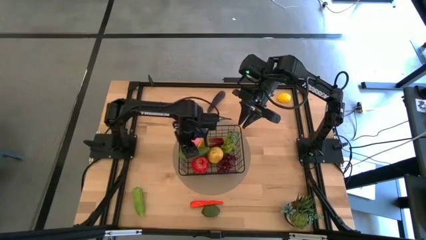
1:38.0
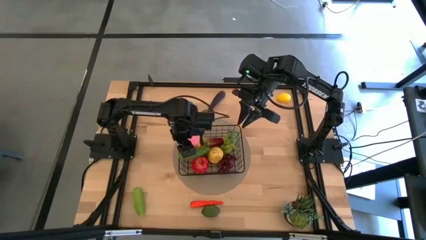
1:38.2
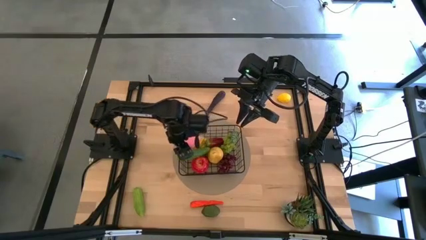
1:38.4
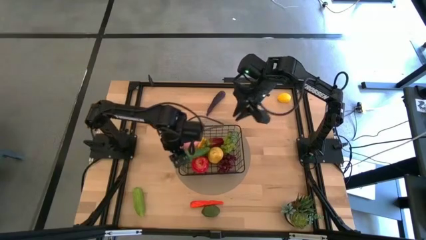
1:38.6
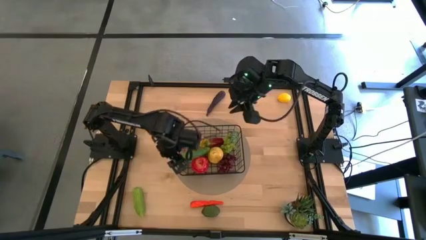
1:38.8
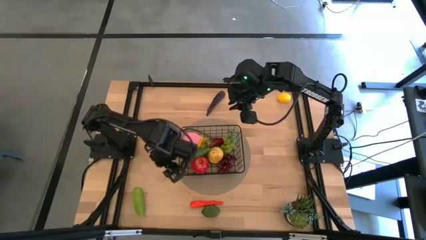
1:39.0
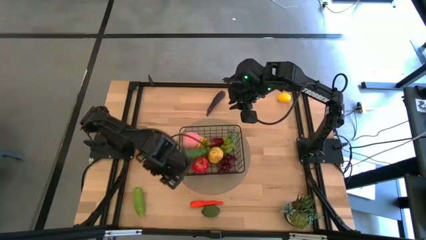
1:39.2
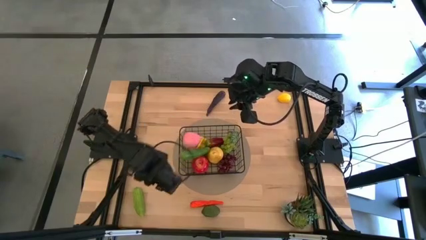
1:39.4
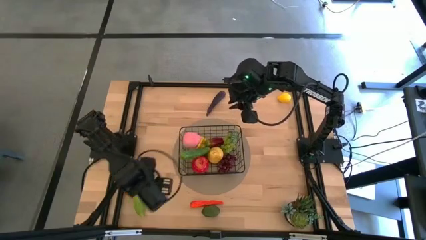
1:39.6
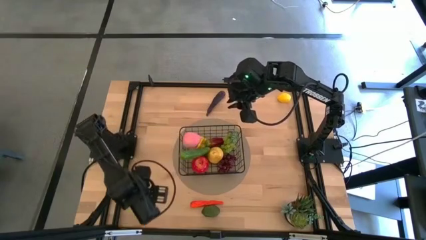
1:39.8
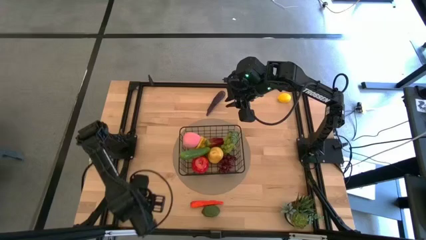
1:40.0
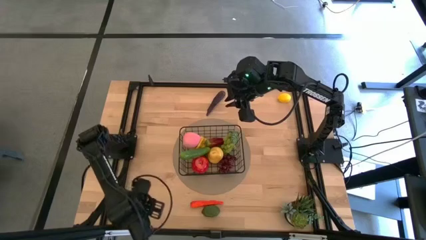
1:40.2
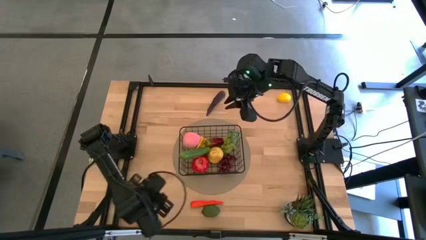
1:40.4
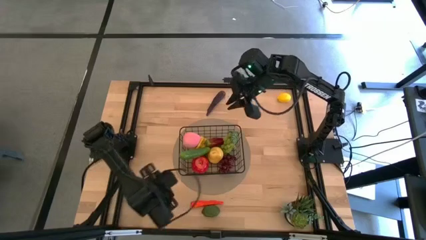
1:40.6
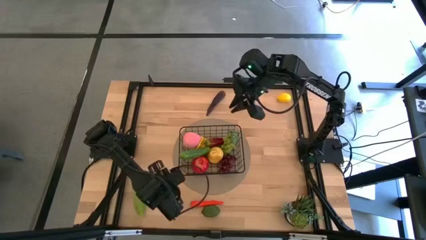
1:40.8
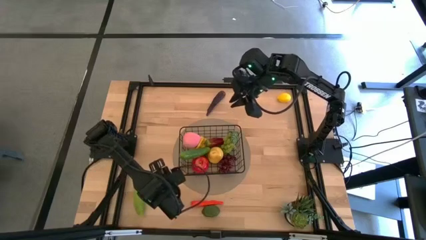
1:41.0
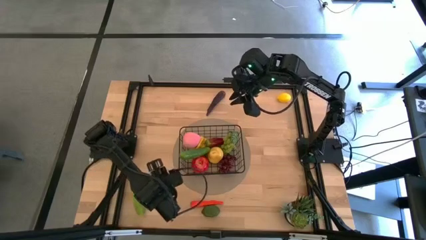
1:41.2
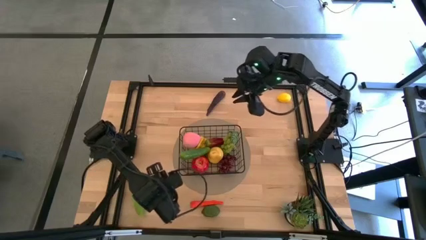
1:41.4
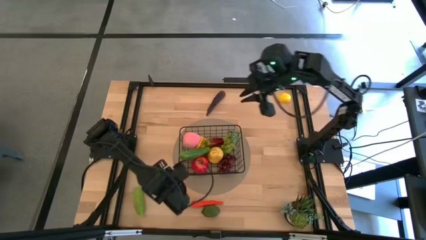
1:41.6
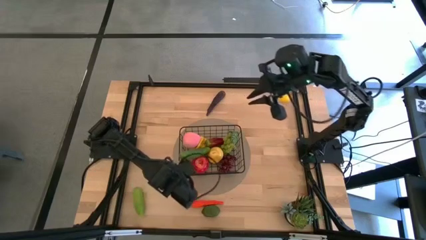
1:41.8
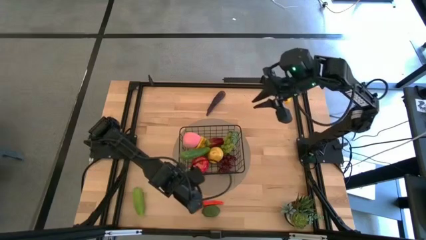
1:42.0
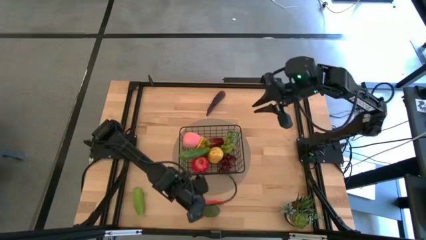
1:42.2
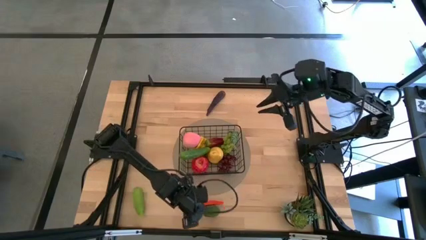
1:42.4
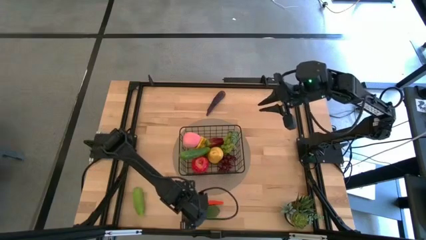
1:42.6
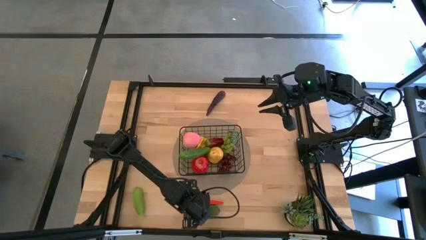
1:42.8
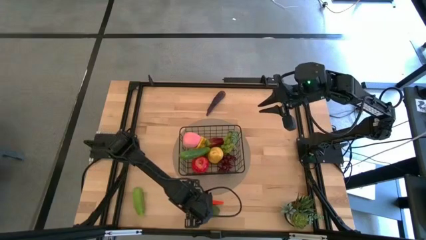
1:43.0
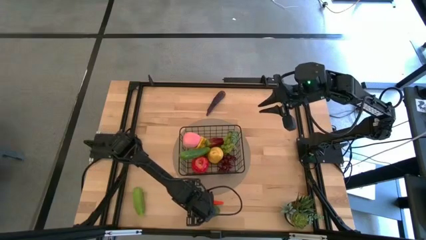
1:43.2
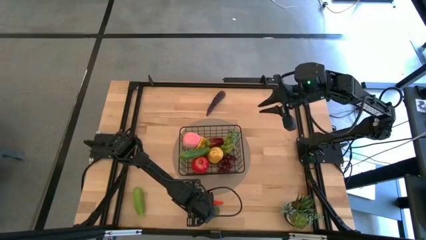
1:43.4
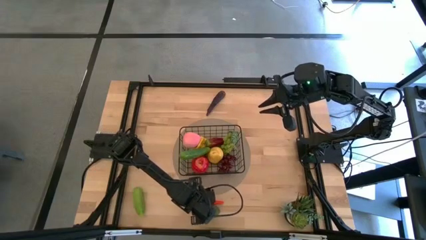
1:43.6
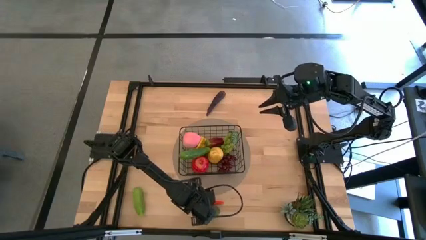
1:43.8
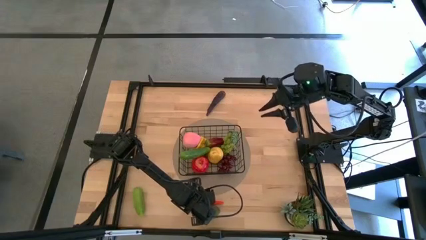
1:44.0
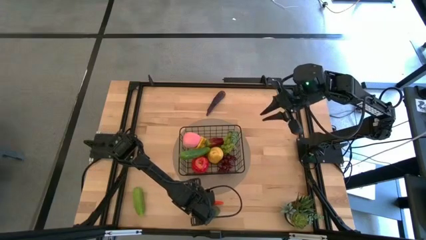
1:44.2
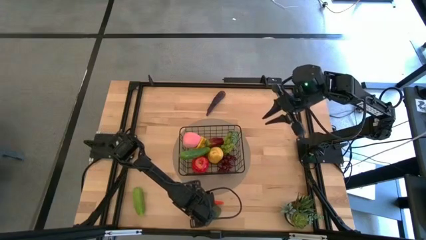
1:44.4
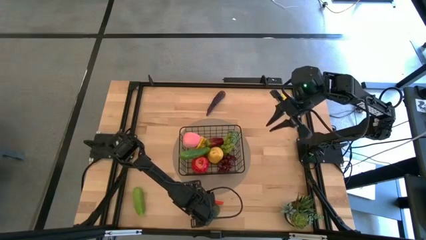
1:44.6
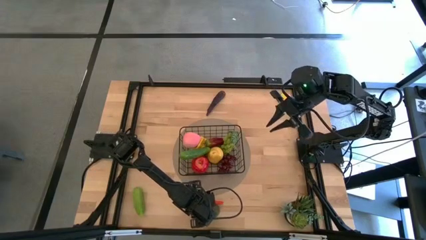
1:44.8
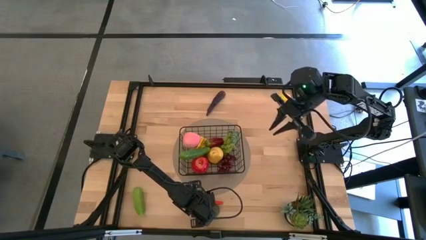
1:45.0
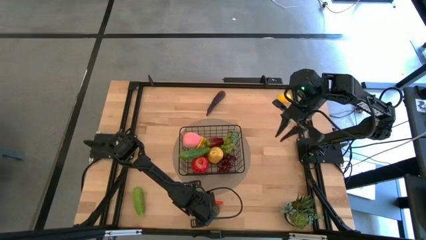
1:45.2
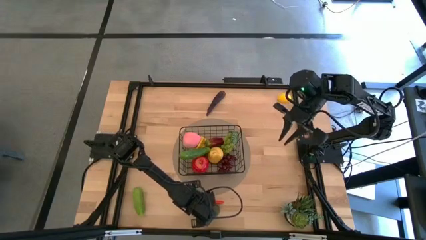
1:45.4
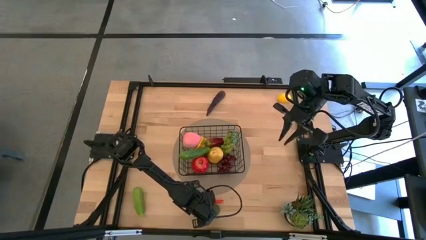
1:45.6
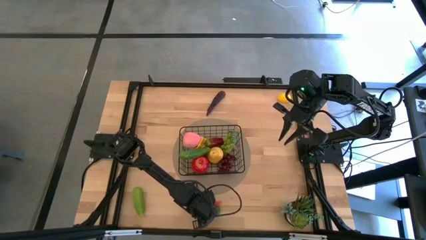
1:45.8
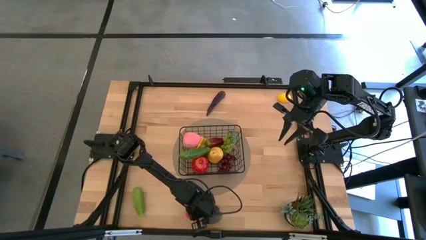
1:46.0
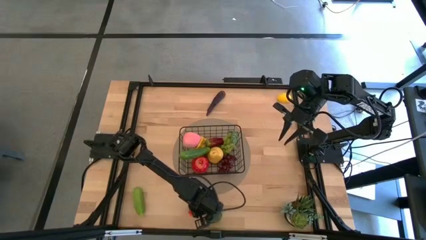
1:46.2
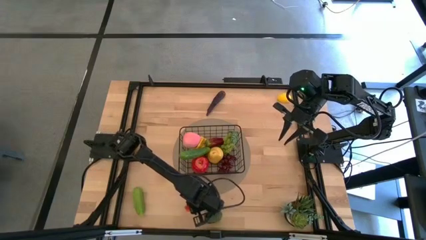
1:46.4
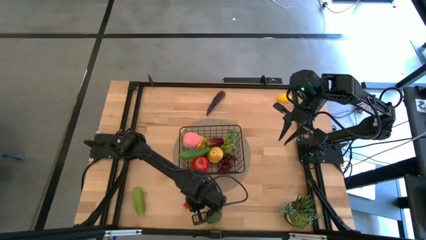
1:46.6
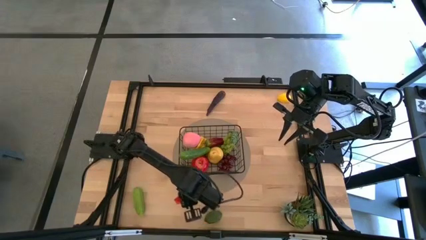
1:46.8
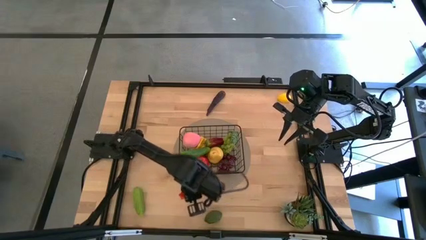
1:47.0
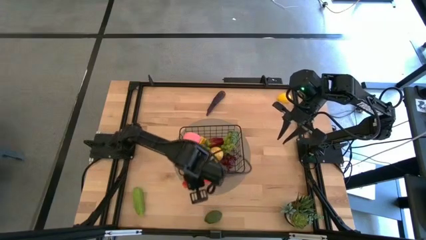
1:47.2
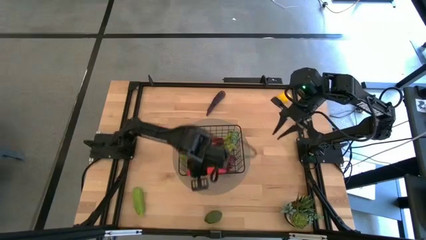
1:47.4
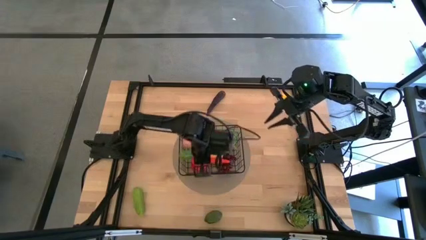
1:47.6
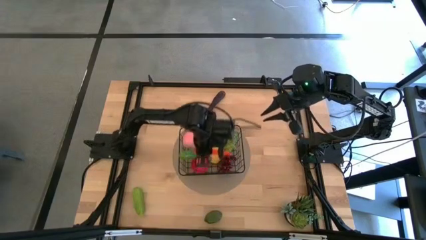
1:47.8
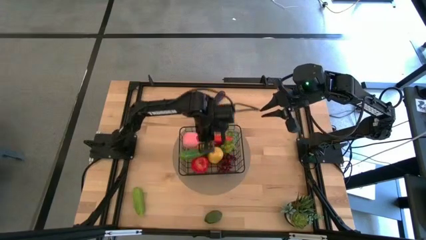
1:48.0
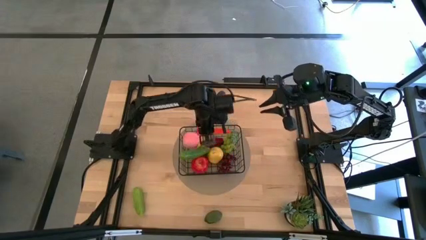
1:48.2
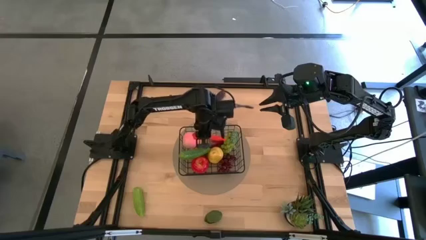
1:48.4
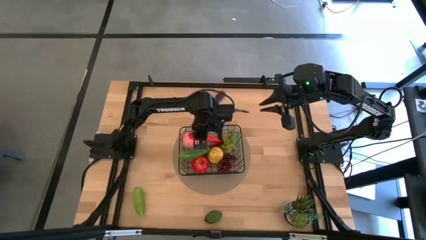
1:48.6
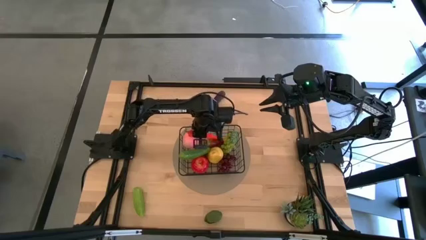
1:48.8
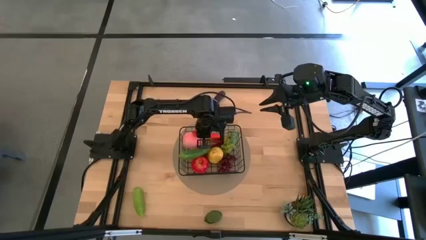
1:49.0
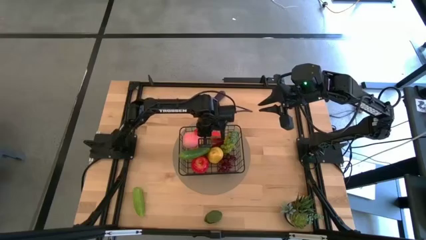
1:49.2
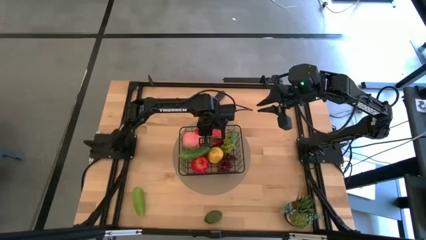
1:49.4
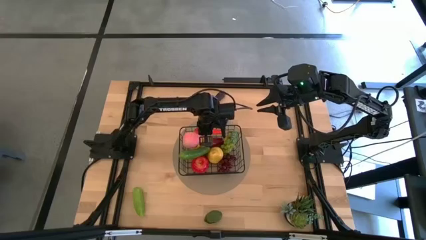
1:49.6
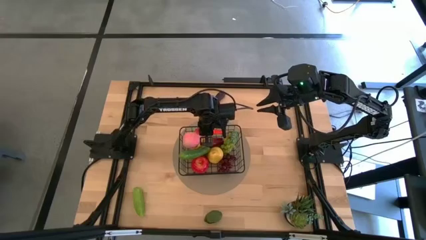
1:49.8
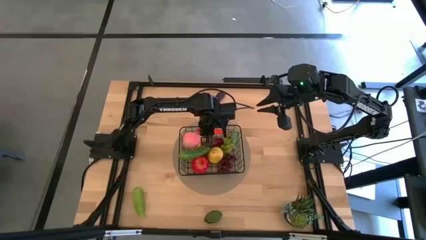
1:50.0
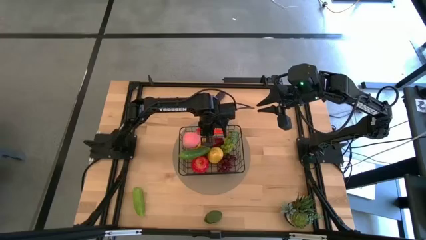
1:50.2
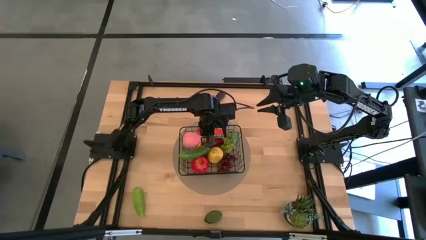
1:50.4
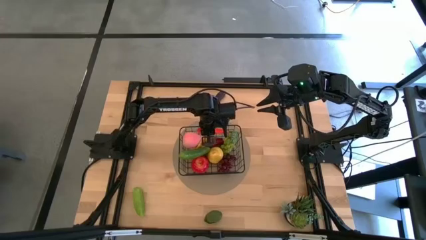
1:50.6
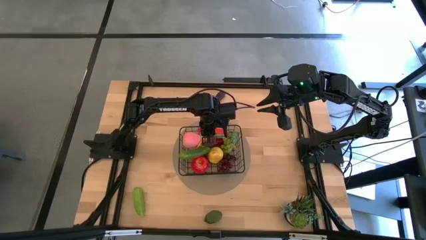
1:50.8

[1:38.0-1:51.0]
Task: Build produce basket
Put the orange carrot into the black wire basket

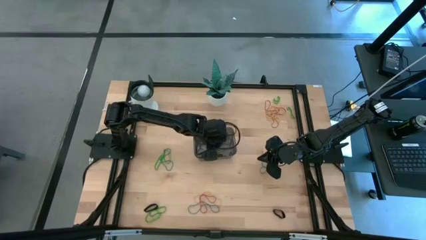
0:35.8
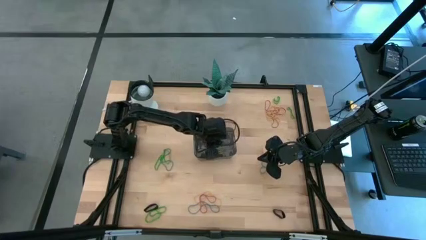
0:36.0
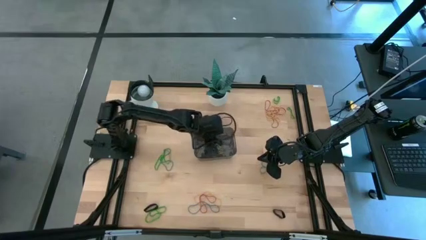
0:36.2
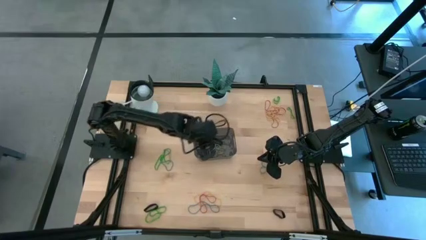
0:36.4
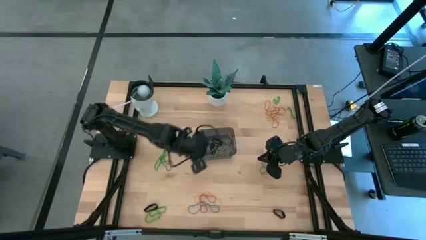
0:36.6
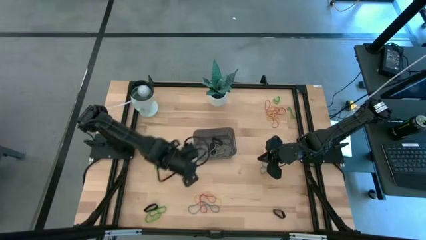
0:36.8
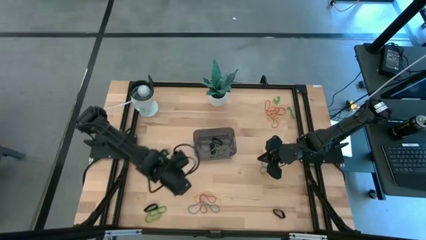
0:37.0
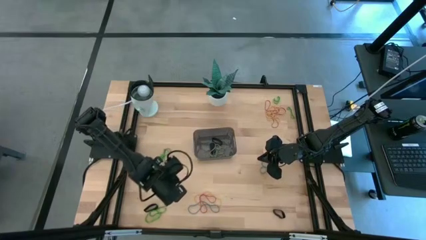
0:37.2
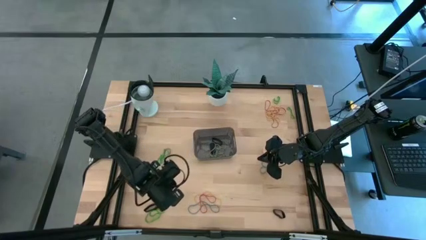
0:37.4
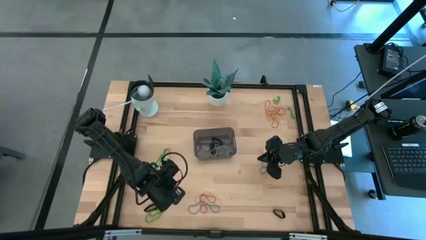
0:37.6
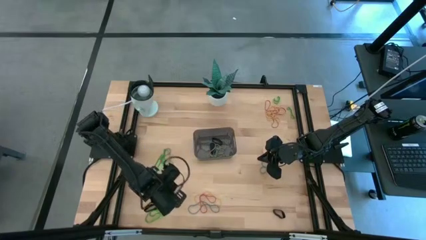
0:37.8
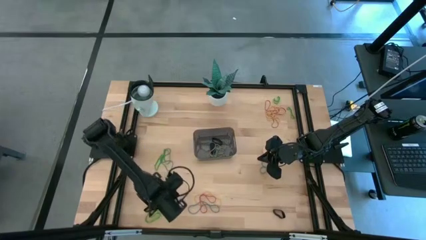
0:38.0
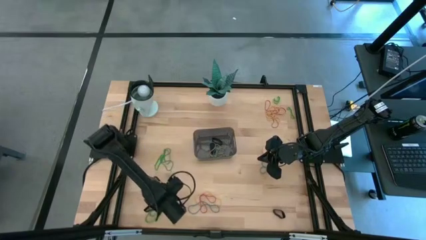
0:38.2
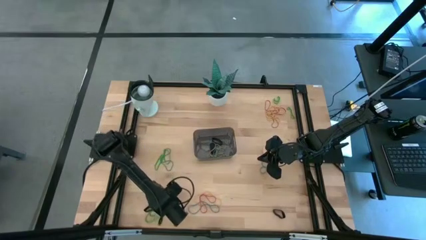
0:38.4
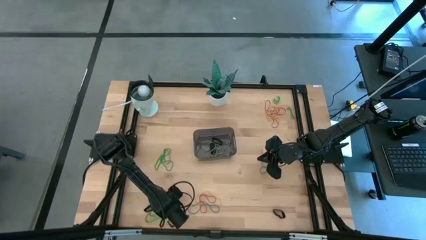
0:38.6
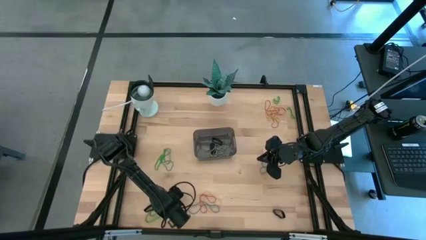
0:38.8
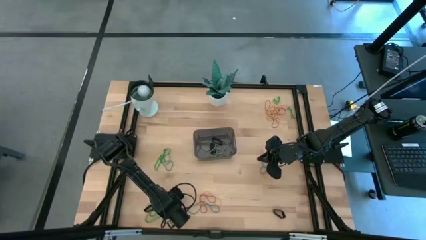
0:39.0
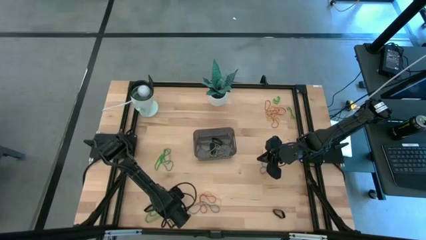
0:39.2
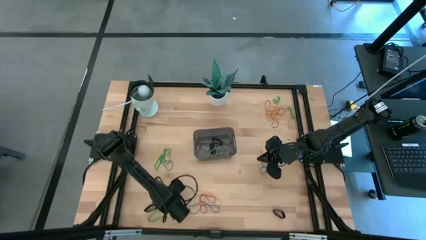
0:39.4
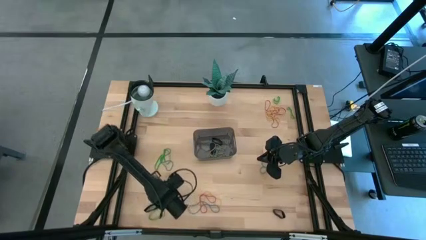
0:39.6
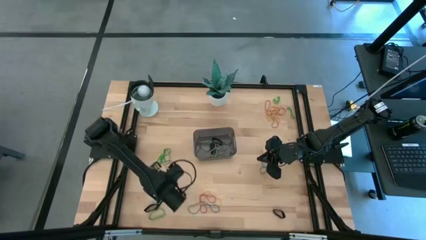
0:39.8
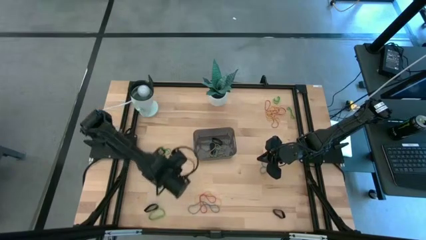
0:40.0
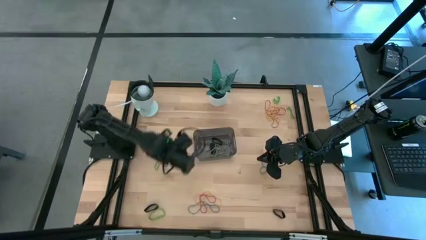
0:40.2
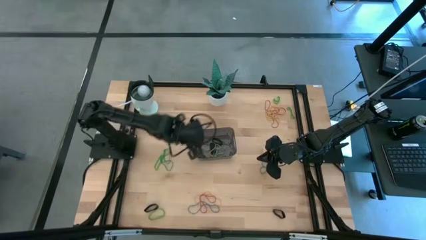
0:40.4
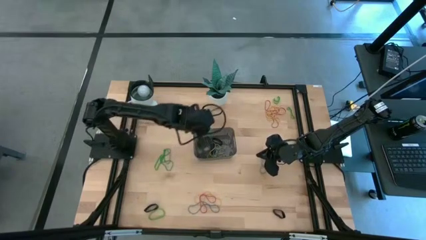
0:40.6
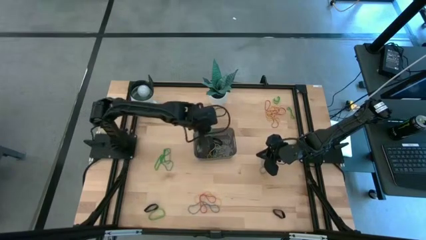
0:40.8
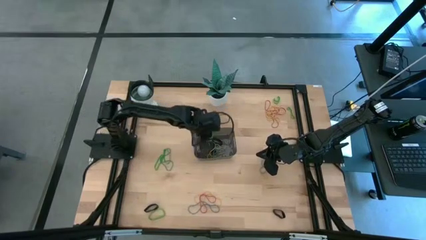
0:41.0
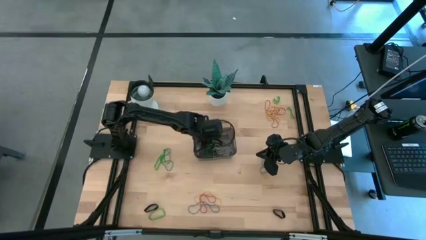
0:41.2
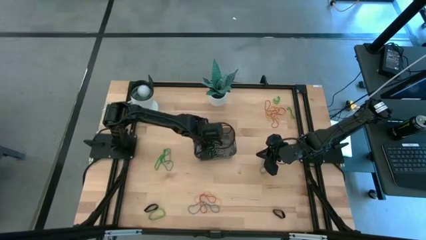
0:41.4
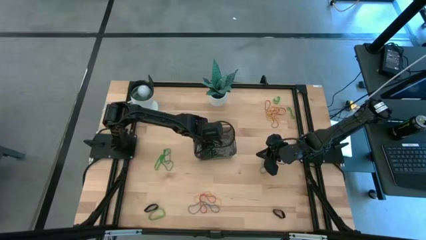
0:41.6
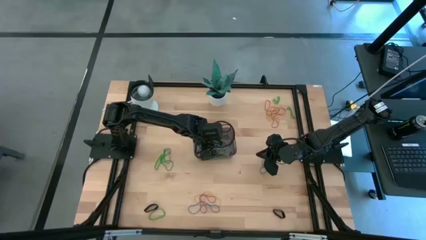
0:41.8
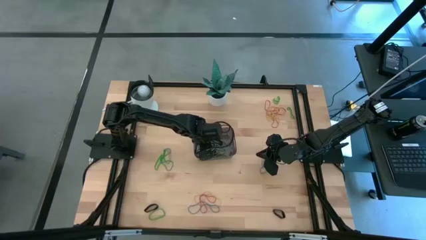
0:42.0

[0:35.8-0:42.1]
Task: Pick and place rubber bands into bin
Put the green rubber band into the black bin
